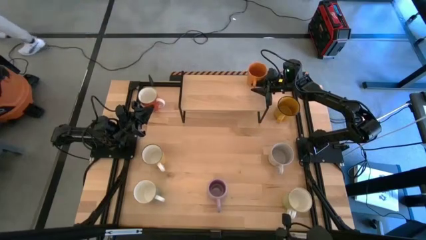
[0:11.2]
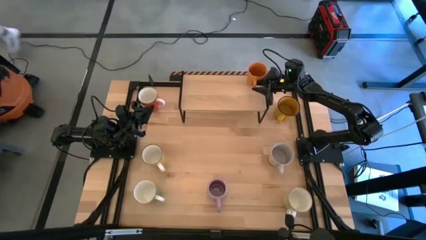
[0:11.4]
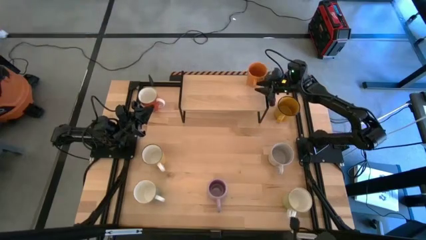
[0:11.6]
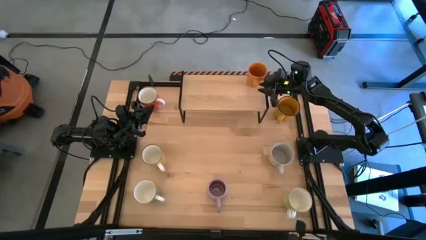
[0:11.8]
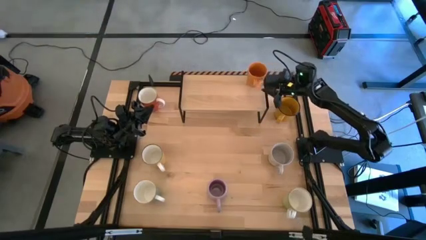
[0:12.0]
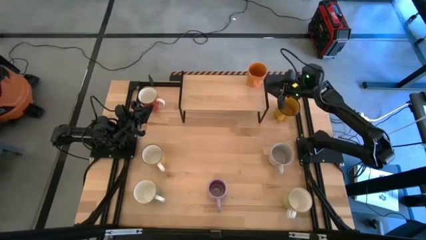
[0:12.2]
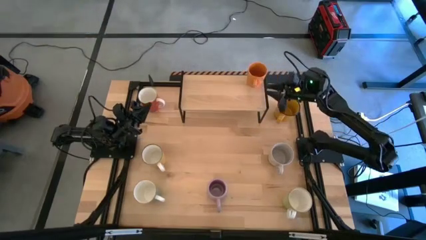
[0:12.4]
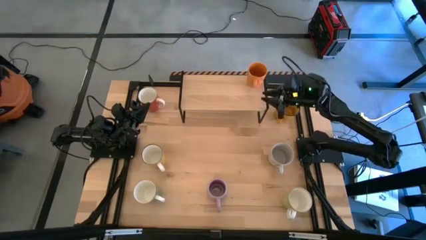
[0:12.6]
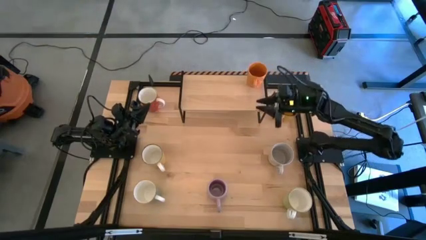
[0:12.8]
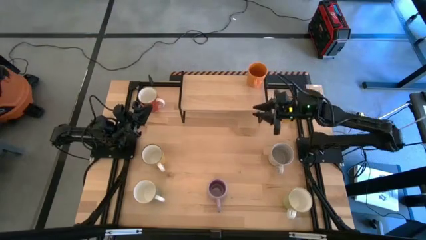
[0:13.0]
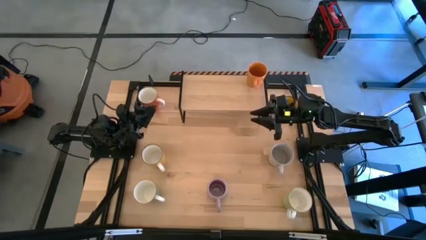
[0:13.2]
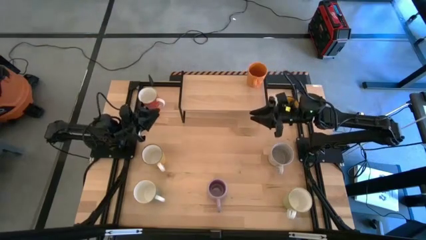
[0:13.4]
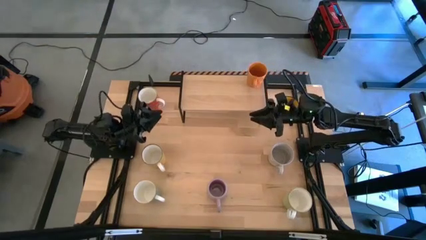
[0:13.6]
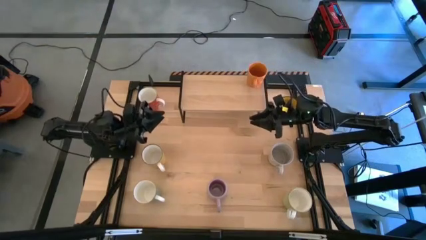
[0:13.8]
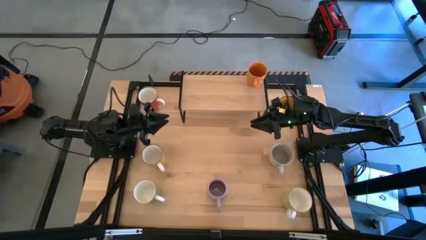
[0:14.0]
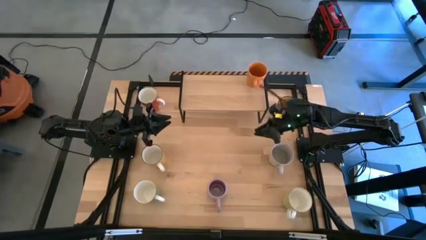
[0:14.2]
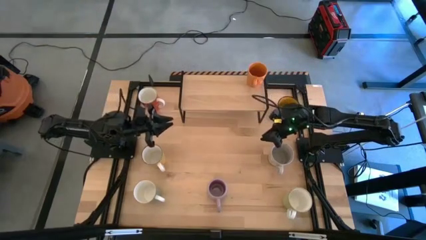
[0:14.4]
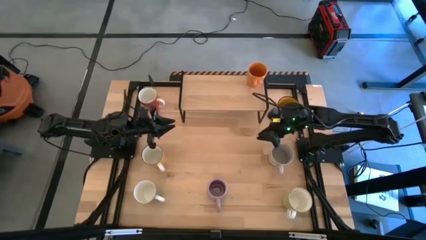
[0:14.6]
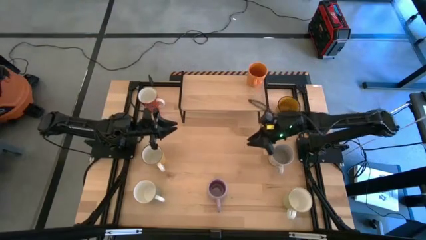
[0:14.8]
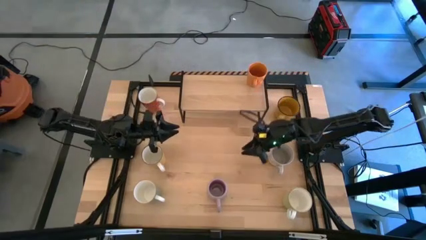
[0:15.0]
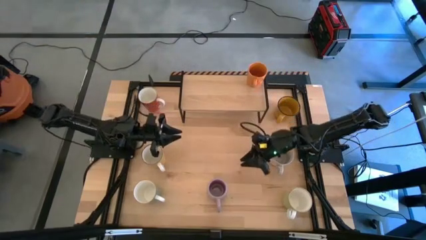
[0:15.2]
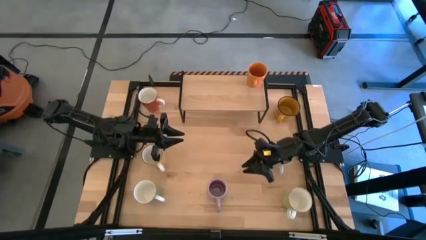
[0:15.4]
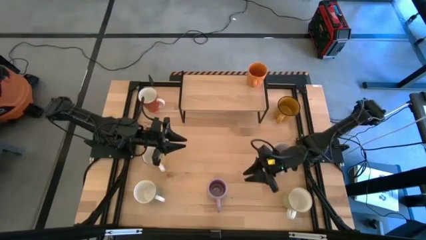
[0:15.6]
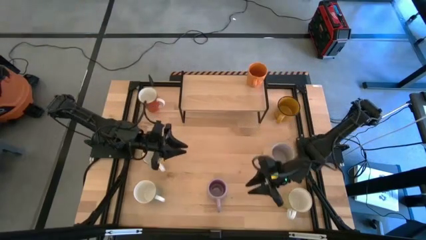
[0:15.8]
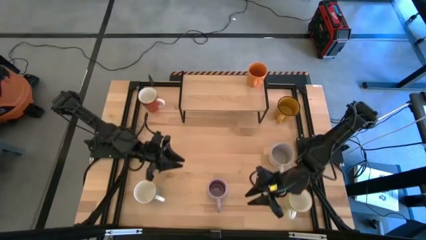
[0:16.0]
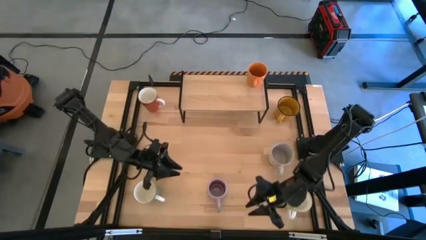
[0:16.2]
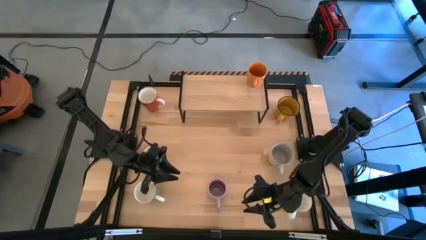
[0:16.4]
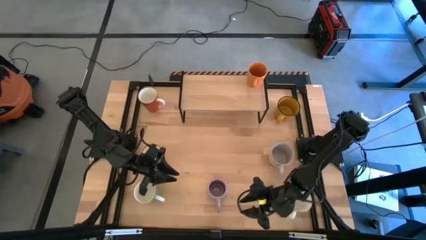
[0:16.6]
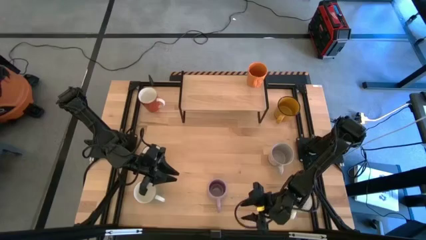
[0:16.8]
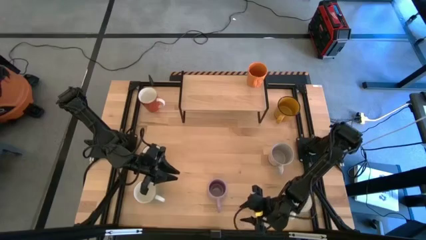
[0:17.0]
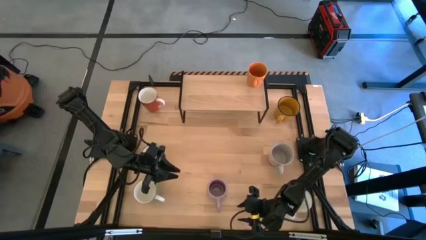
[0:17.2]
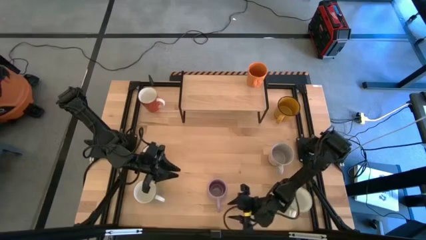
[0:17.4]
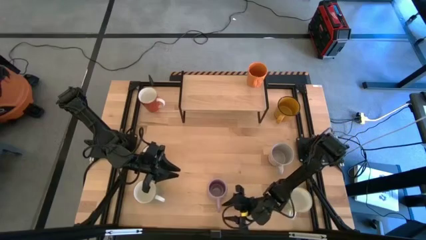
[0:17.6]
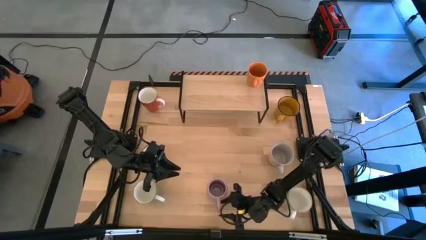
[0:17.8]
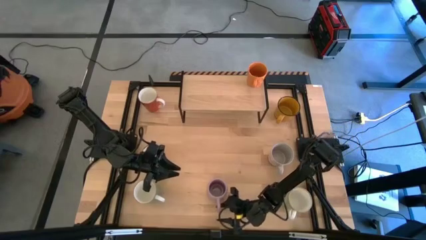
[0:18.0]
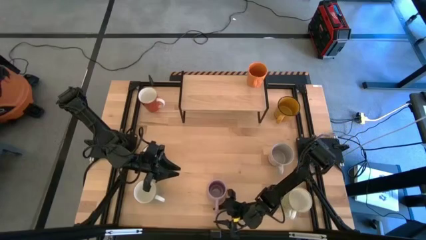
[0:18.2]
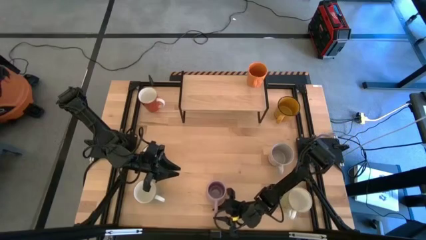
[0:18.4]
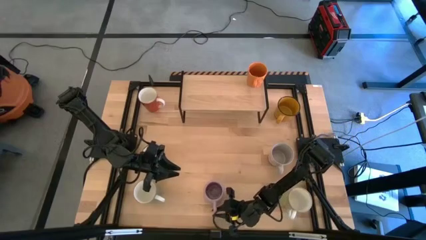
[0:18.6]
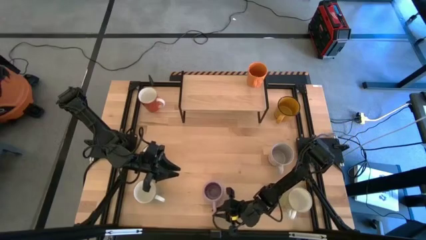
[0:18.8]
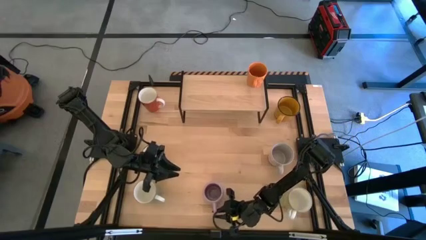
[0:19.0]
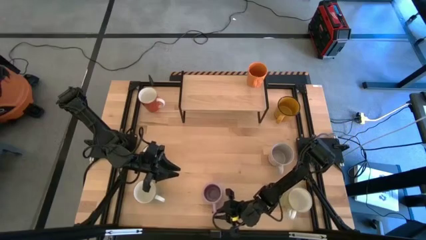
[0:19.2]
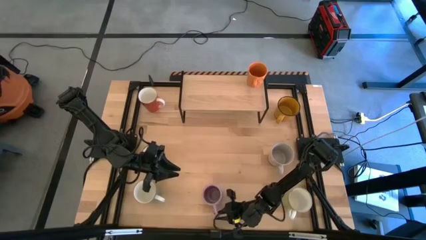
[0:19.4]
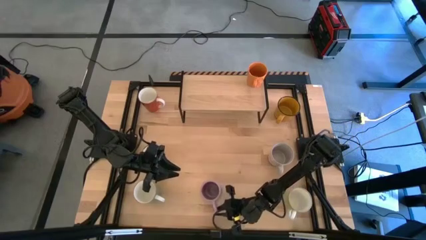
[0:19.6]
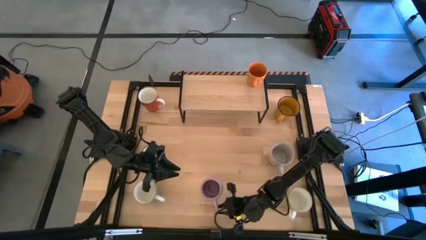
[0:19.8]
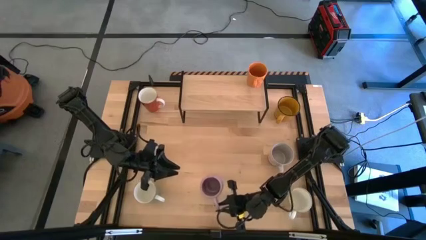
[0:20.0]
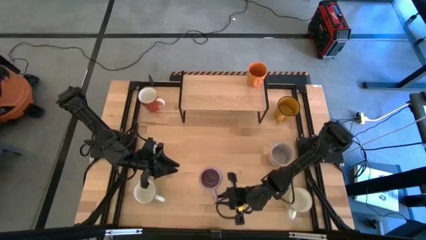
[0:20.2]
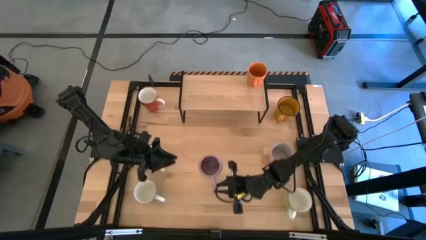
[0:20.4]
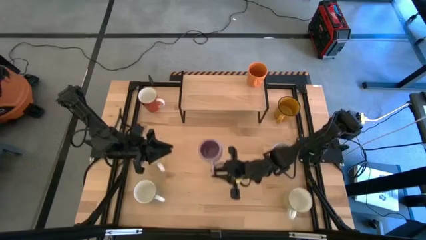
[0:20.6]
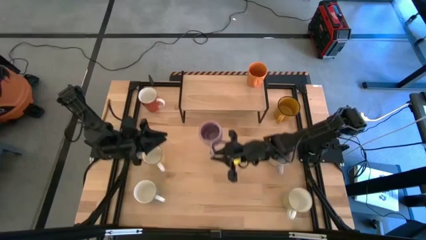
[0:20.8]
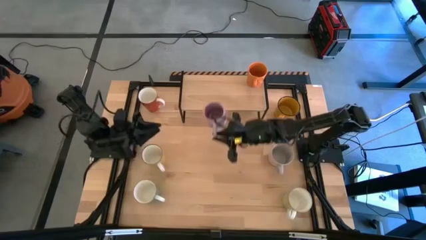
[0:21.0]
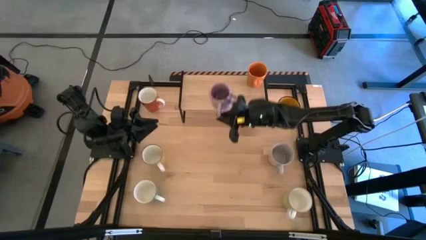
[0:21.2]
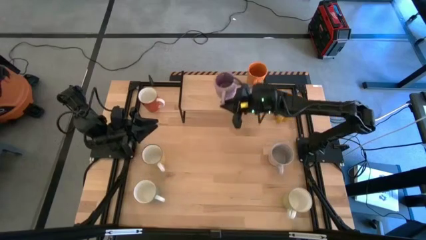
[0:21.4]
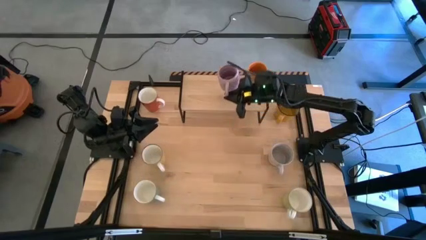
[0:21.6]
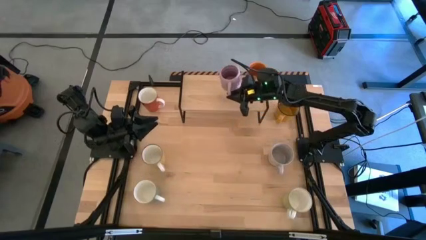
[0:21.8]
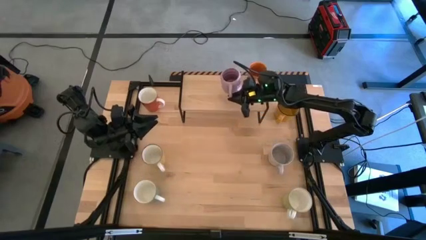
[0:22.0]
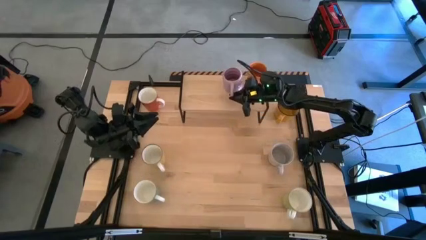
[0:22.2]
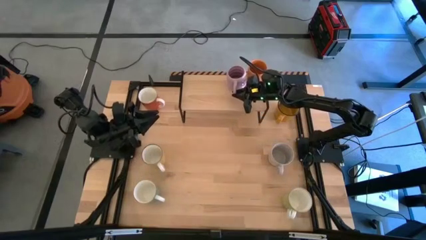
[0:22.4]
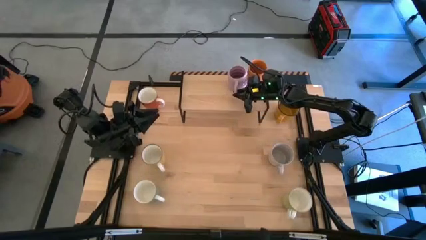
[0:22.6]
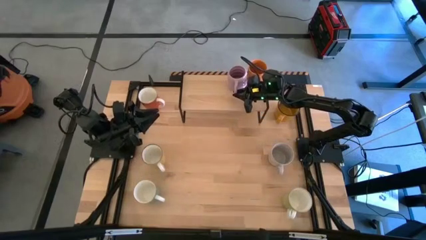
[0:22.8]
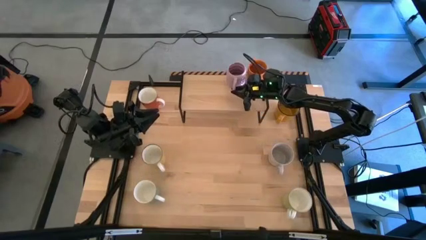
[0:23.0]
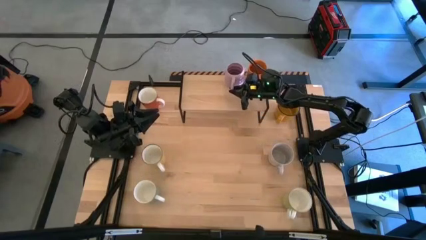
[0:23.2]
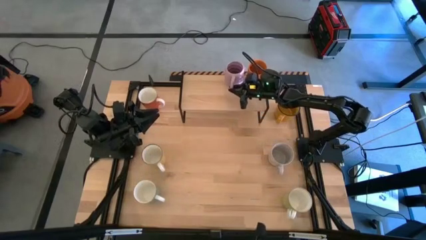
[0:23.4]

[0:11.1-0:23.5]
Task: Place coffee mugs
Put the violet mug on the shelf
